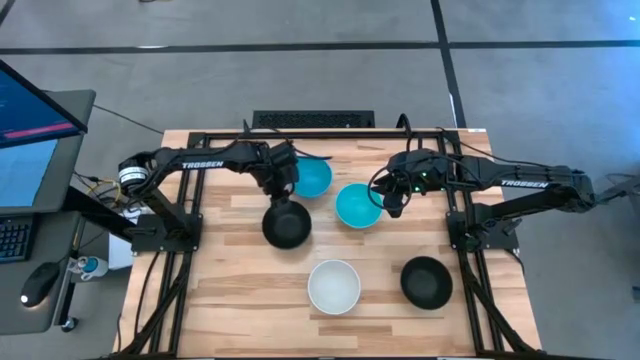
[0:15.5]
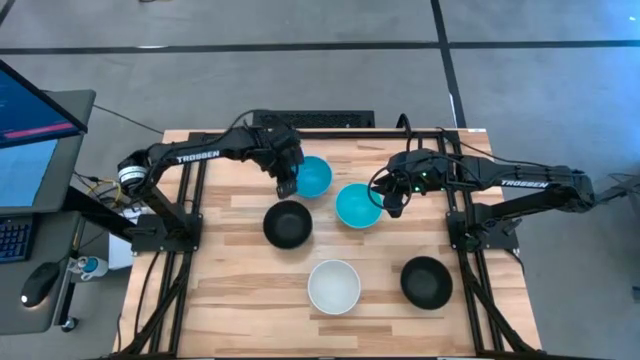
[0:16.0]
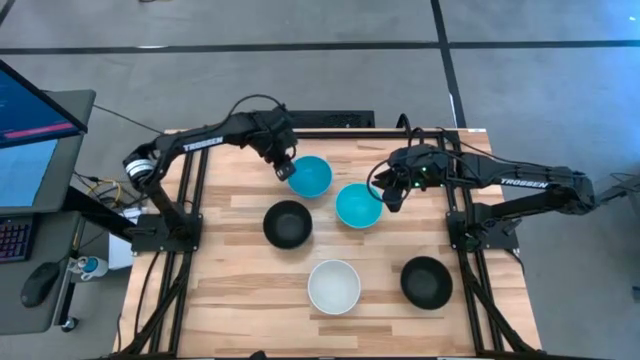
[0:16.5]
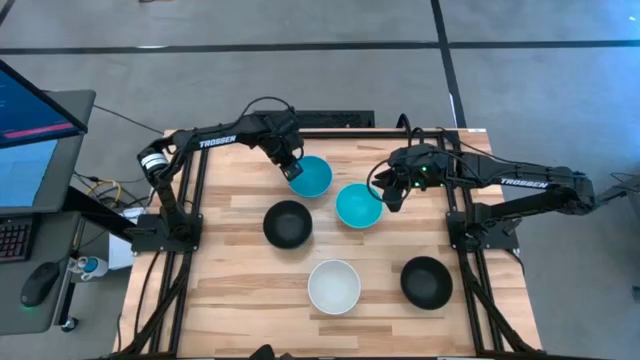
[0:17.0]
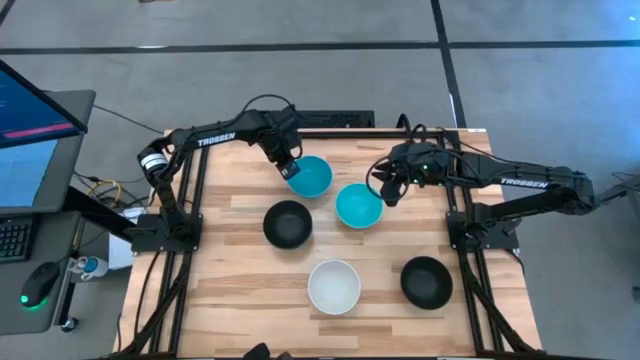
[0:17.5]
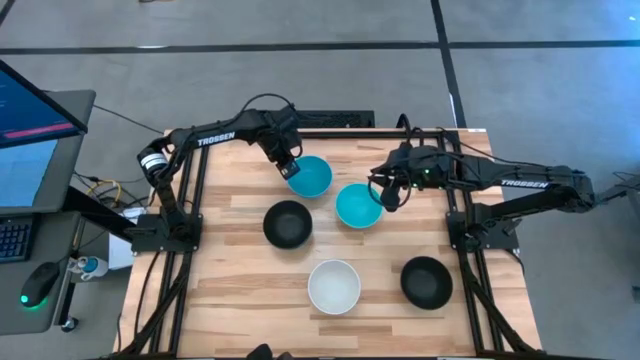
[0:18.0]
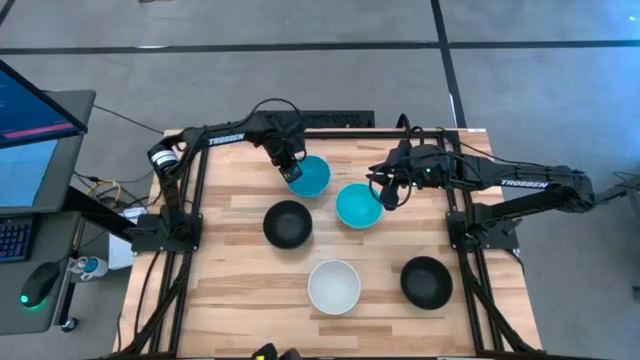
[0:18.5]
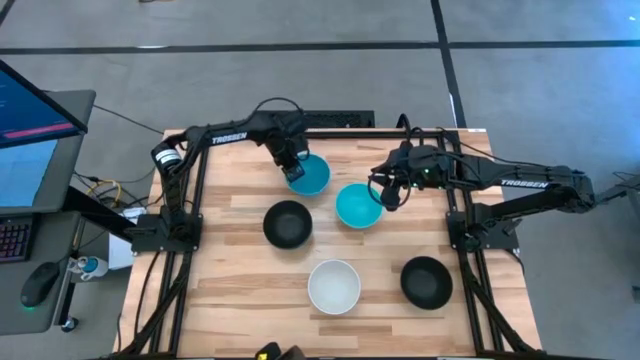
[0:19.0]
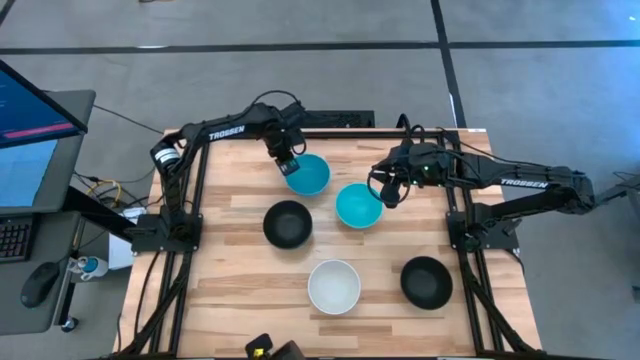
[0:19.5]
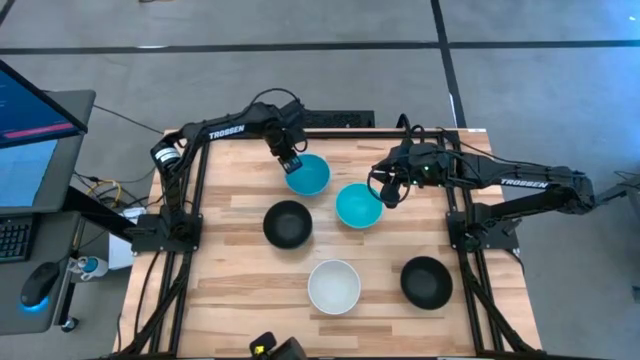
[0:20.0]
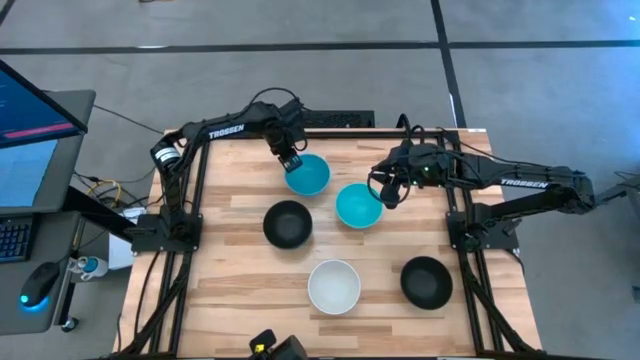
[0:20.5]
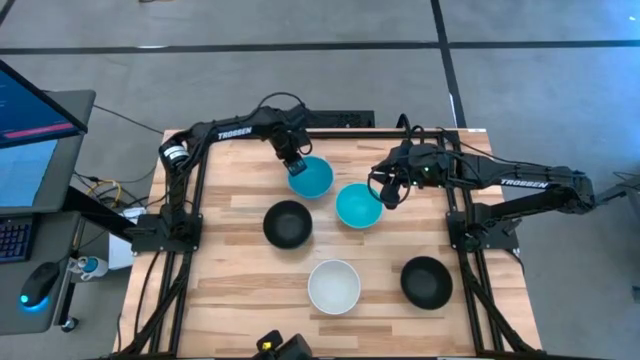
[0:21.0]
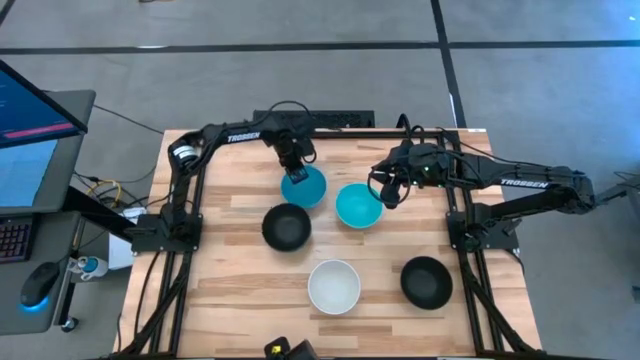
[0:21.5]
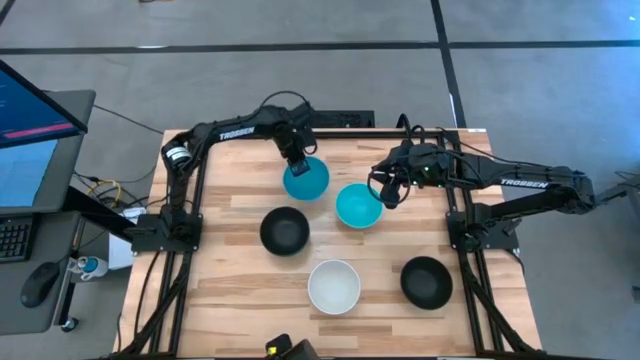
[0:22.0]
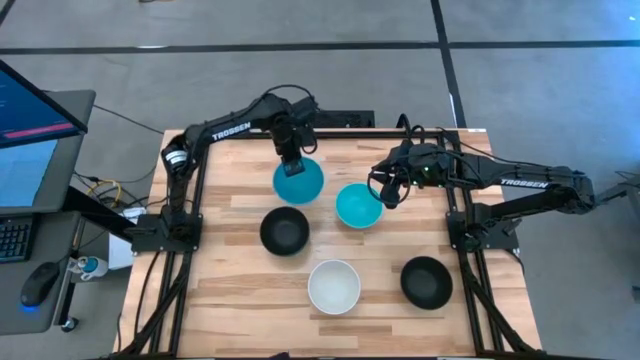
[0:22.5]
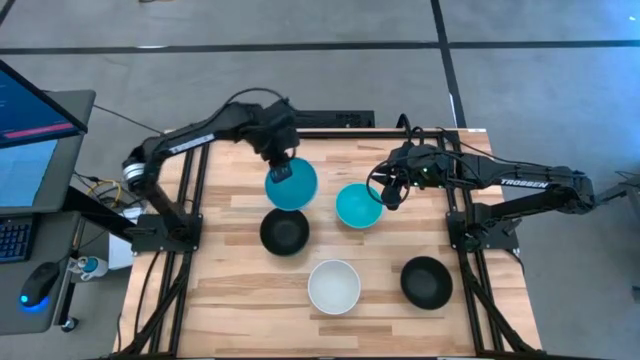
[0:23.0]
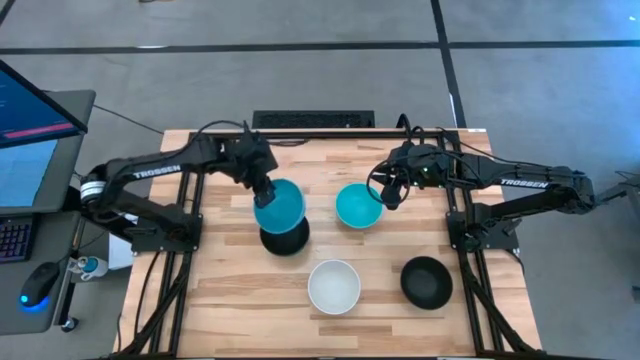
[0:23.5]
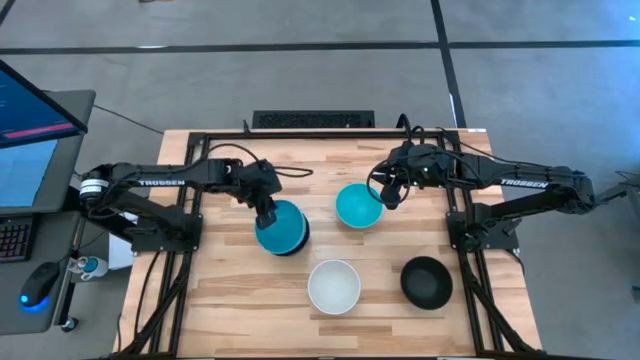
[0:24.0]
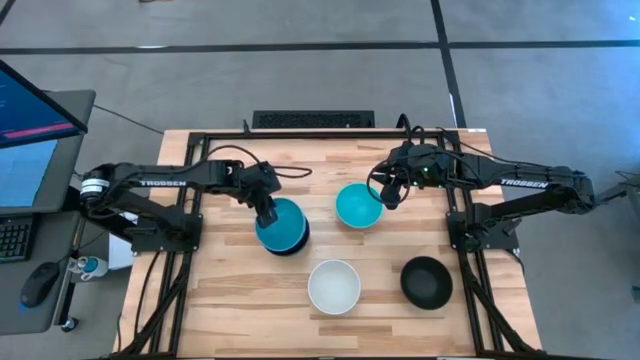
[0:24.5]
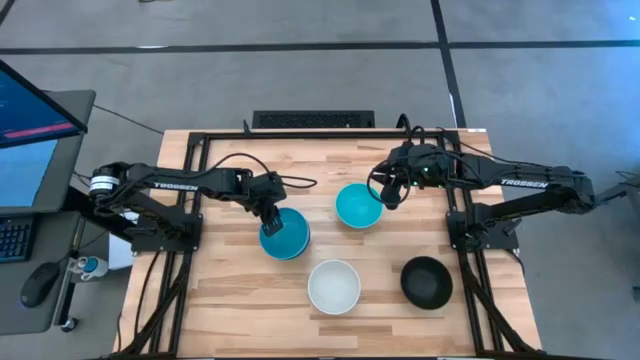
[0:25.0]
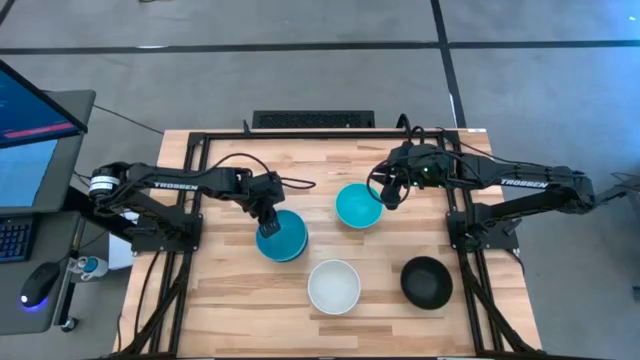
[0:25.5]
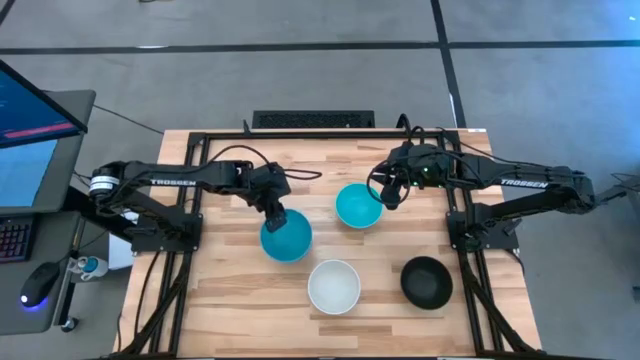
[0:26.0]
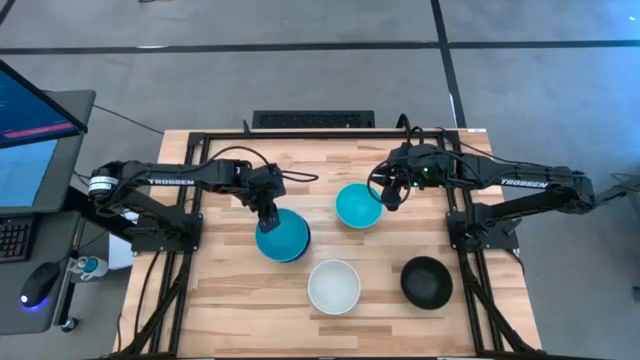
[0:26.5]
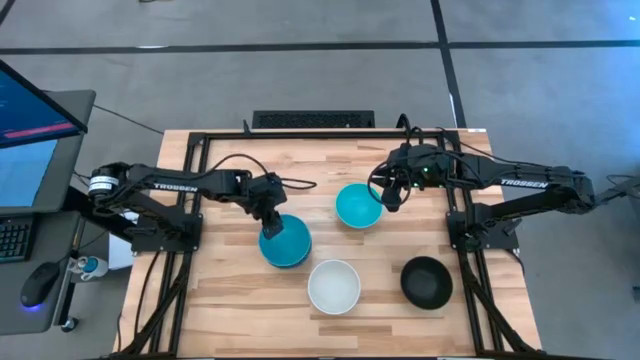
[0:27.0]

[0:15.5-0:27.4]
Task: Nest bowls inside each other
Stack the blue bowl on the black bowl

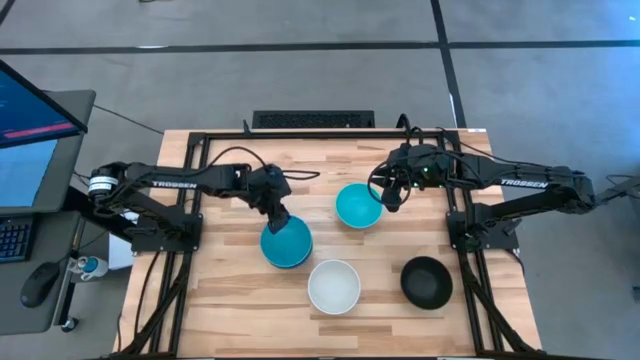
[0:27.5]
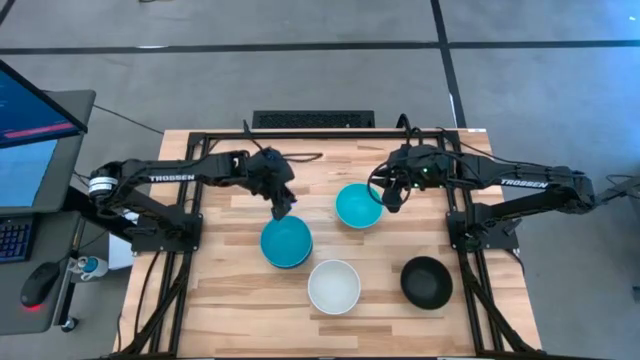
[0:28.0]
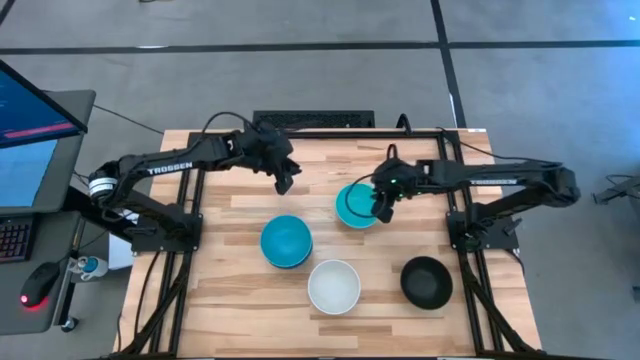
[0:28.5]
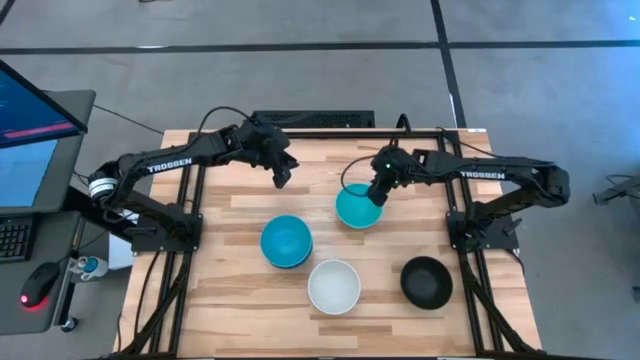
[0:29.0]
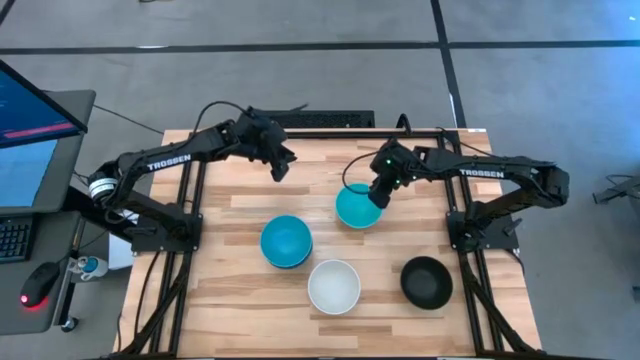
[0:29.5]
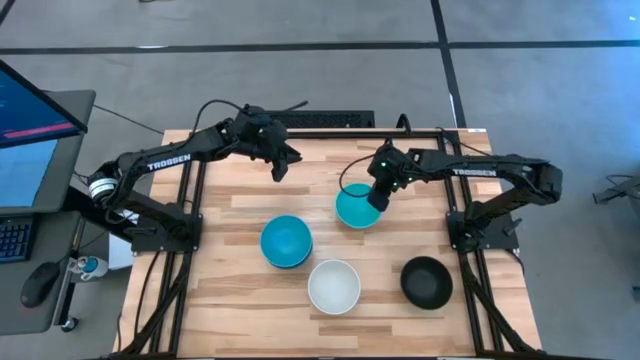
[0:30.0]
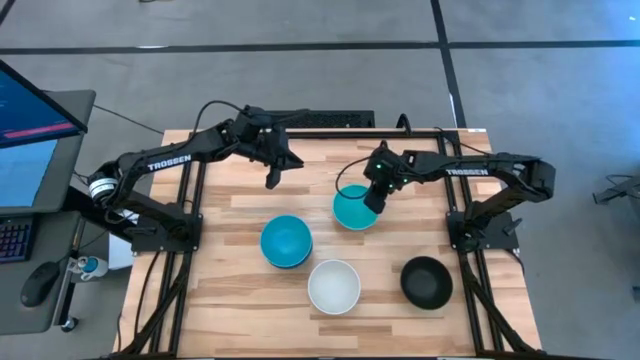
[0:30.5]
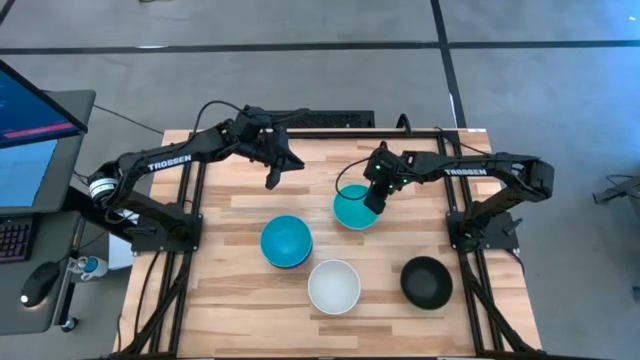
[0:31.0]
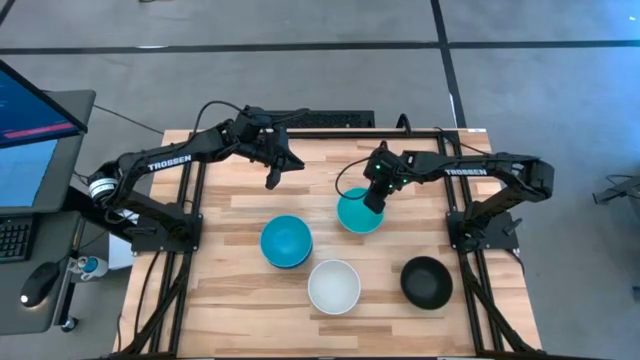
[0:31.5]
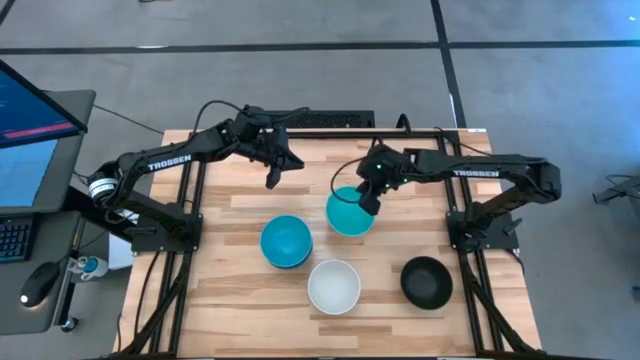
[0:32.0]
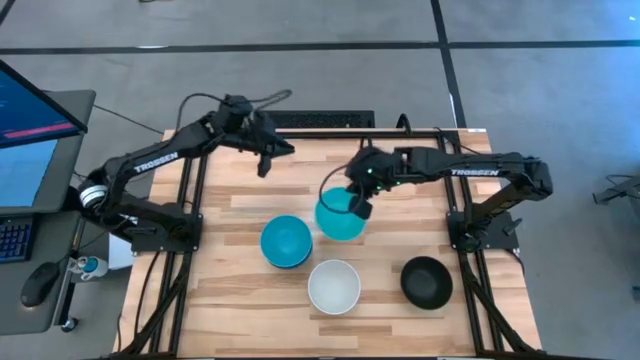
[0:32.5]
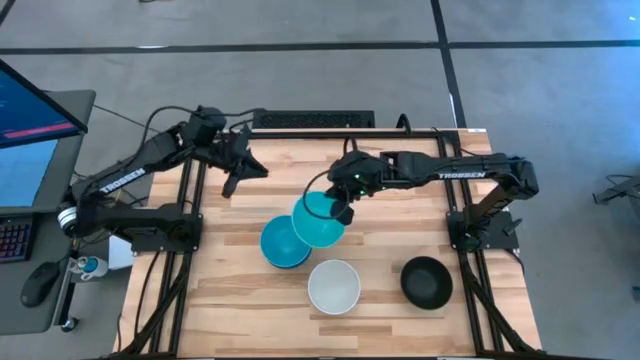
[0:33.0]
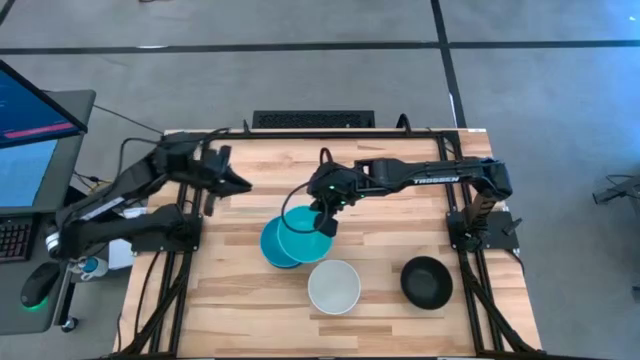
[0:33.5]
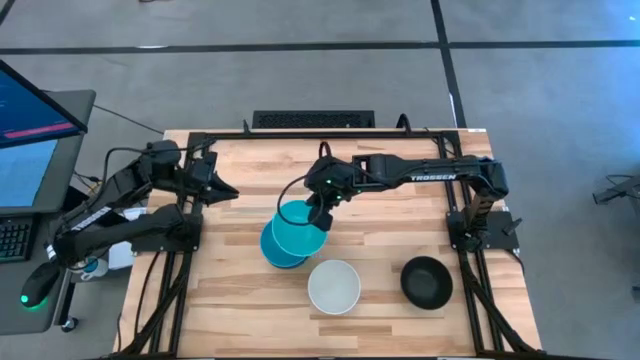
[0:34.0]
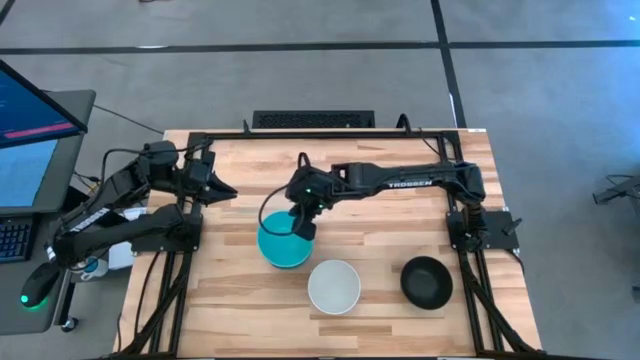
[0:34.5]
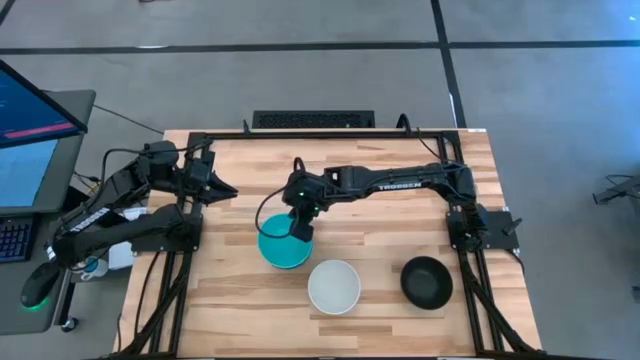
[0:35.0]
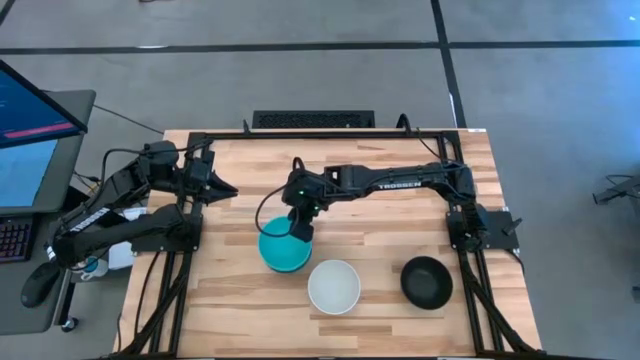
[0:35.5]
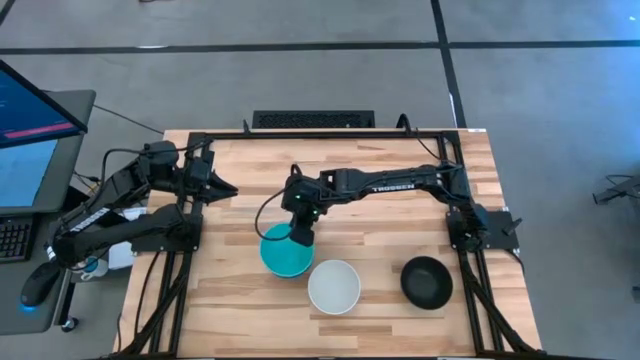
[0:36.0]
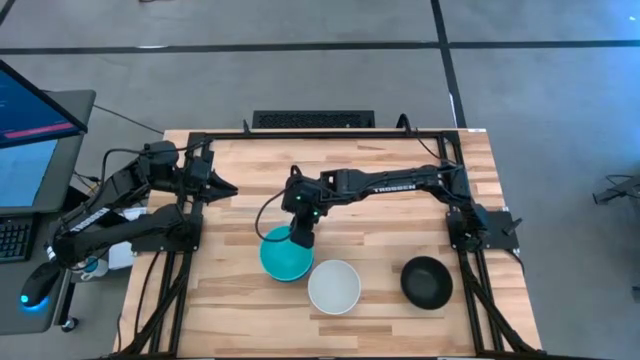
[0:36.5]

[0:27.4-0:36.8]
Stack the light blue bowl on the blue bowl
